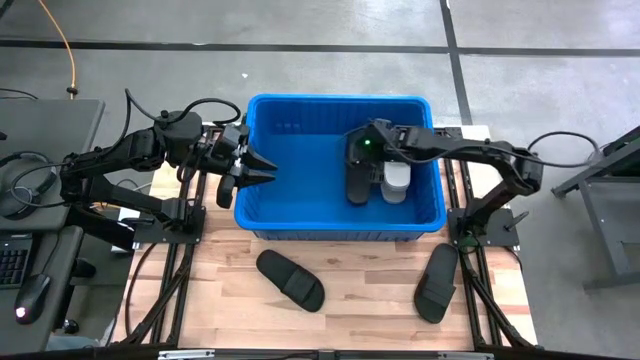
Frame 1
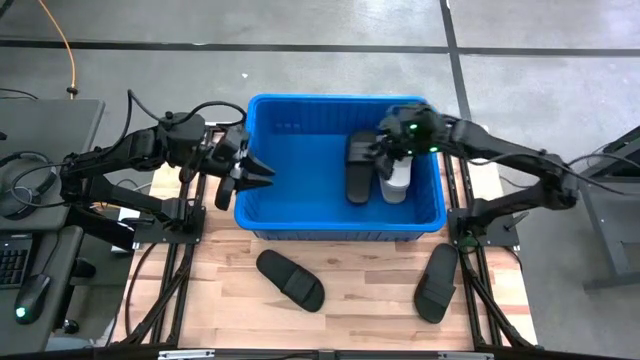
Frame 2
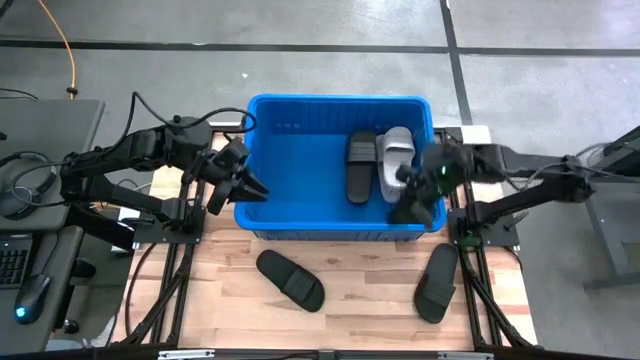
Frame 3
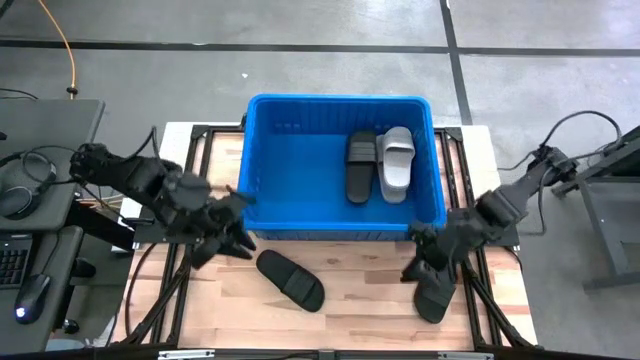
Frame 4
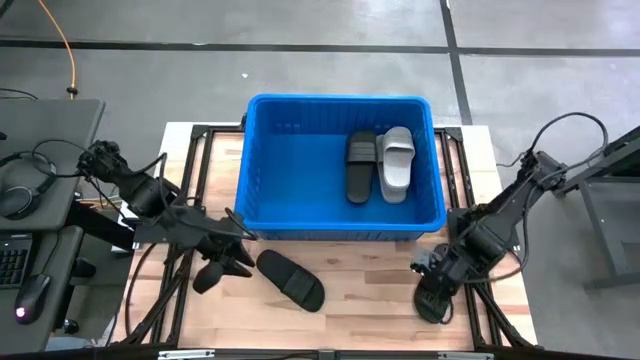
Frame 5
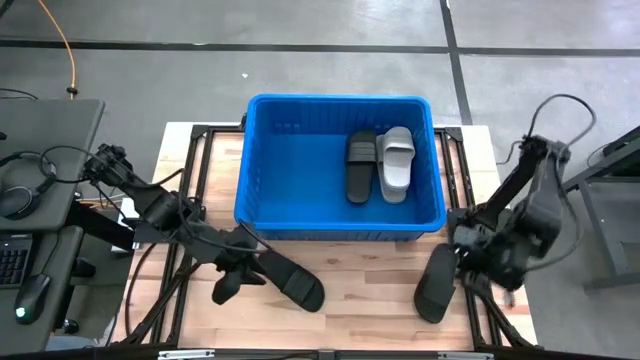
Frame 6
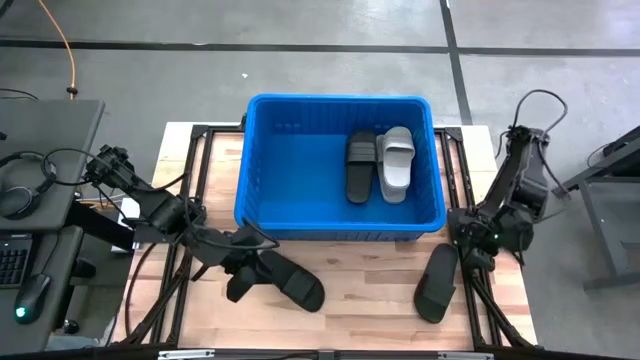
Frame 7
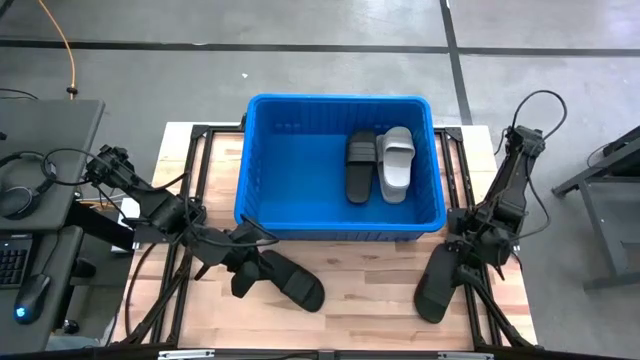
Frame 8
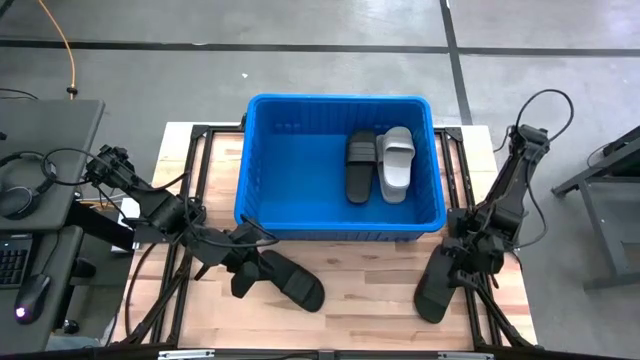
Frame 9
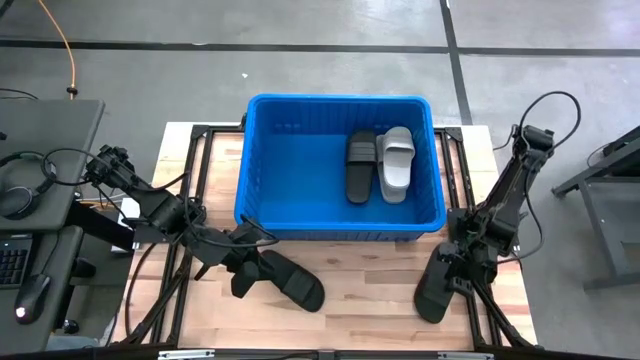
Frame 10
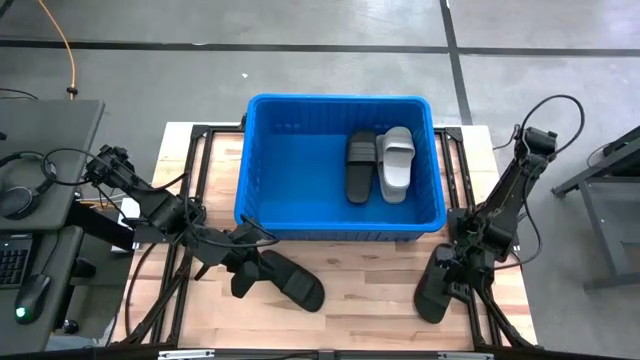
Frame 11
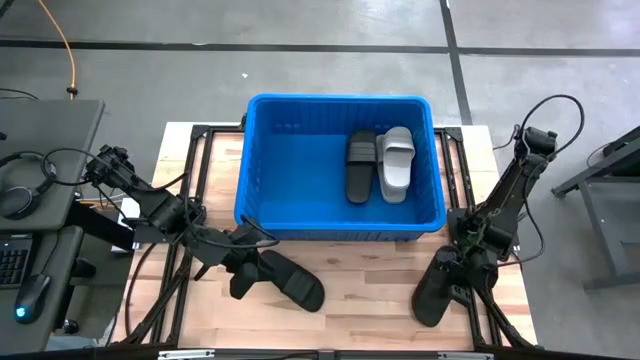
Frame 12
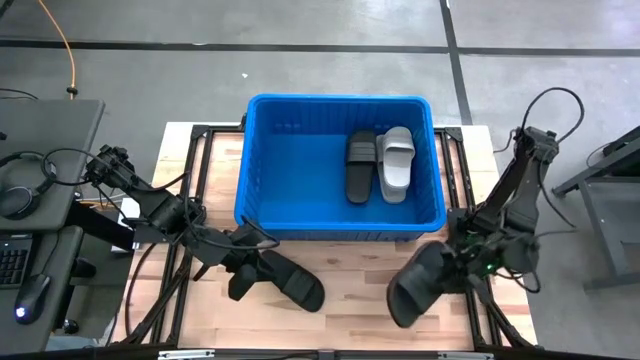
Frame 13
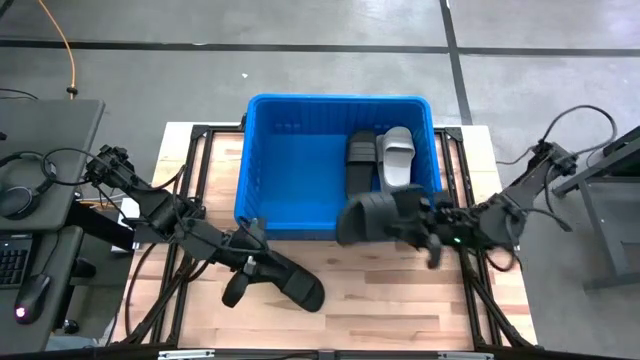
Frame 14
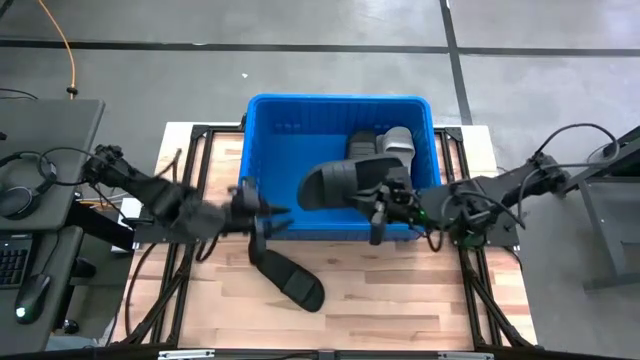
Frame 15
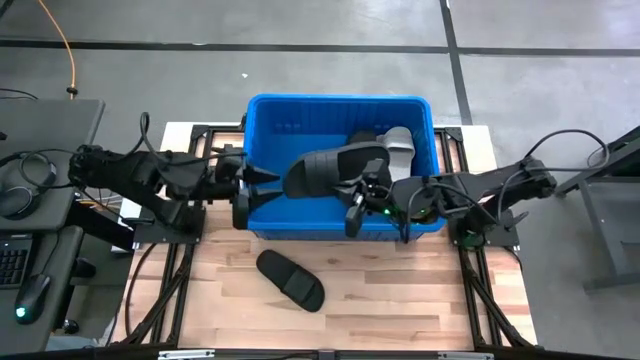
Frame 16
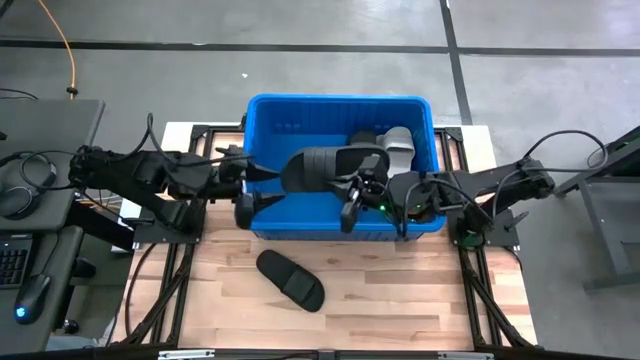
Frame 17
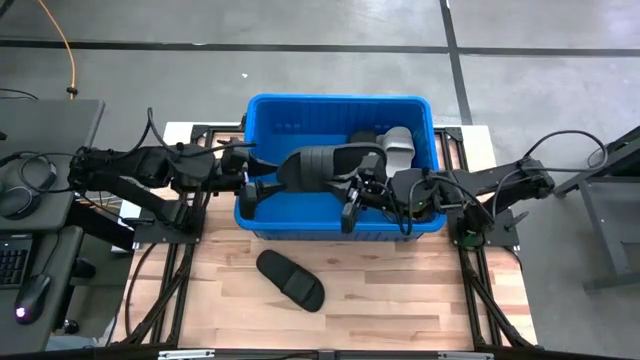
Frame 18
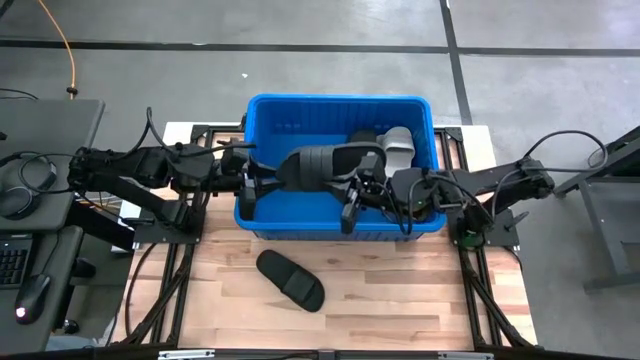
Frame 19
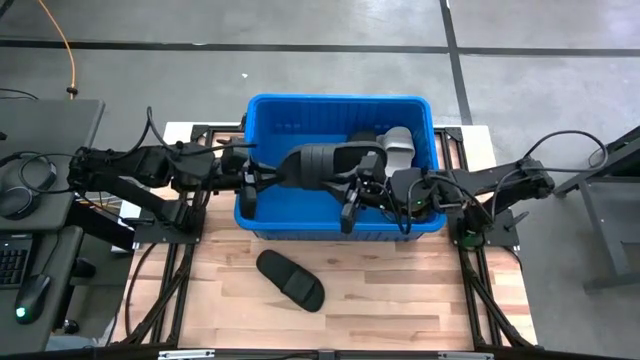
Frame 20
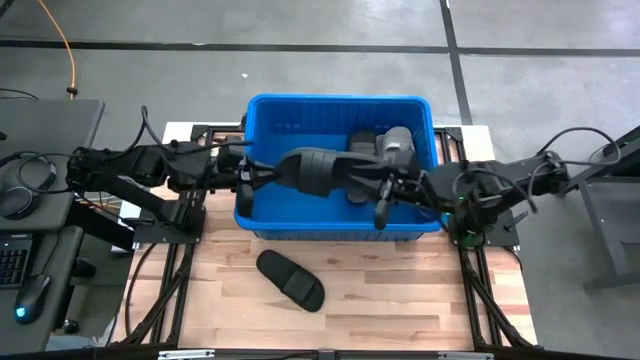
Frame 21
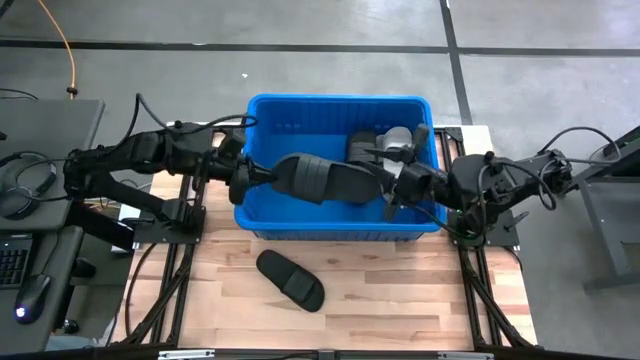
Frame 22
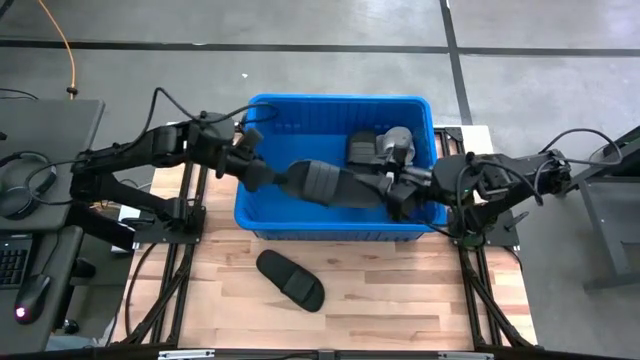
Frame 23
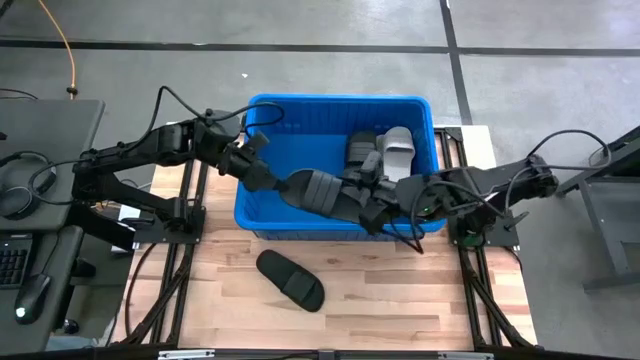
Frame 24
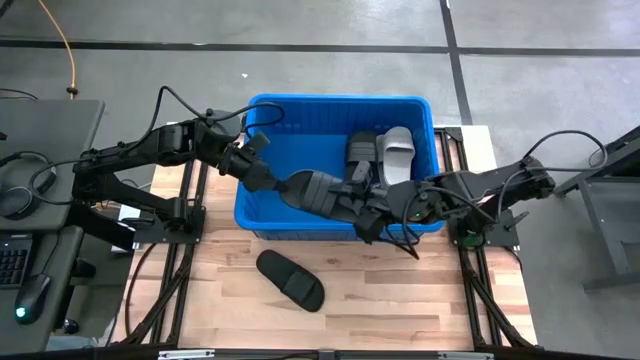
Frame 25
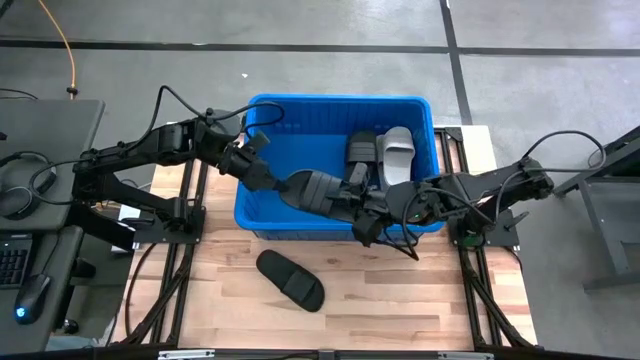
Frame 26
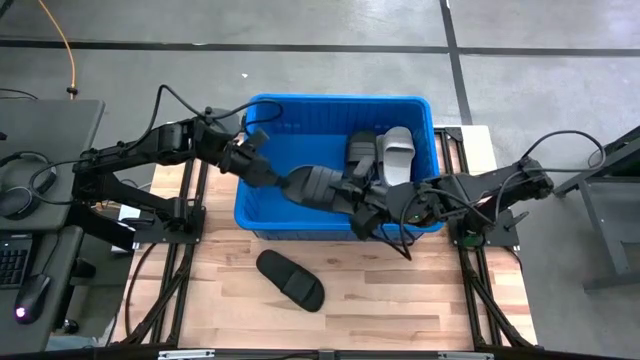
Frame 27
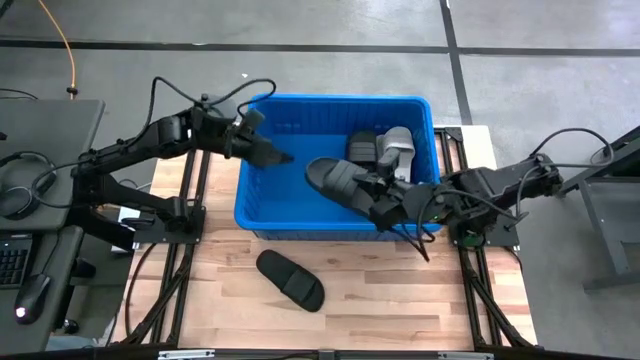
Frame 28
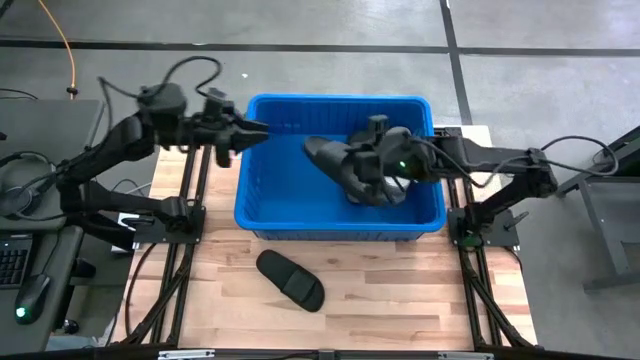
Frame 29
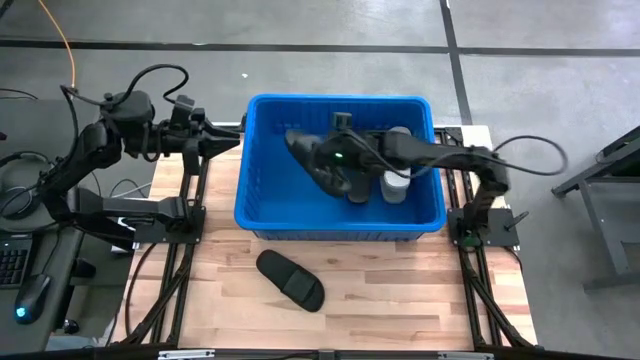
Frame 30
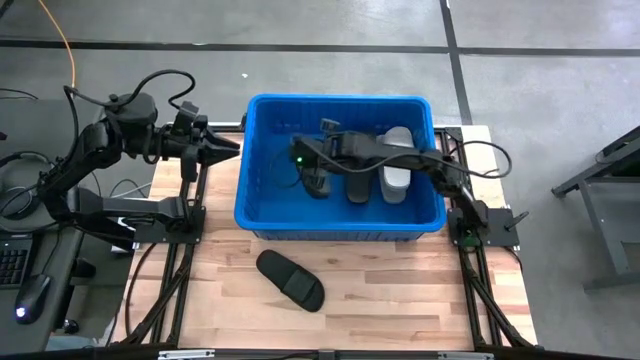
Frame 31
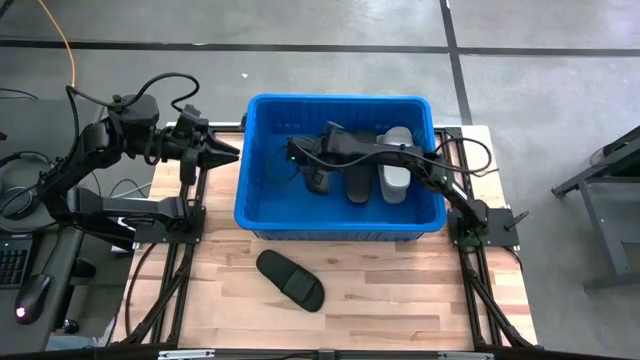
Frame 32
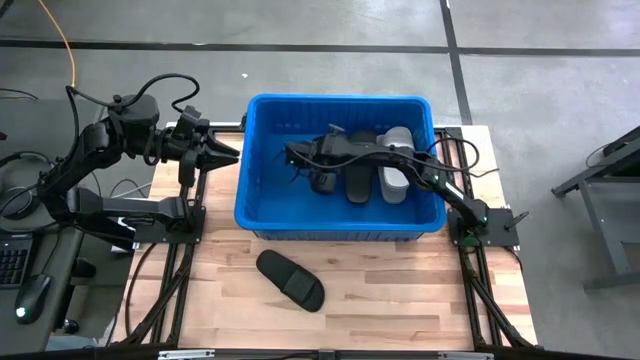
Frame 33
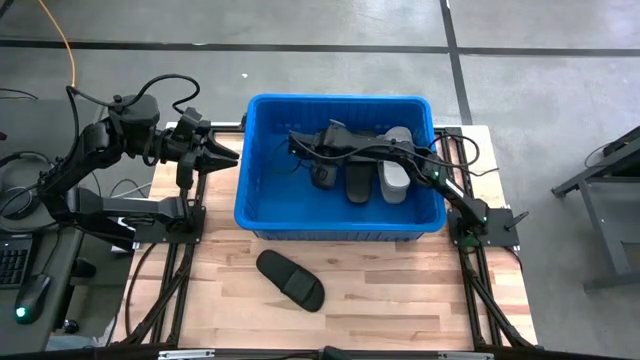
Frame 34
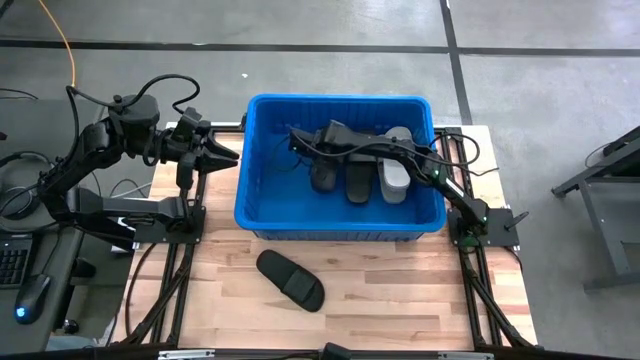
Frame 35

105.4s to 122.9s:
Task: Pick and place slides into bin
Put the left black slide into the blue bin

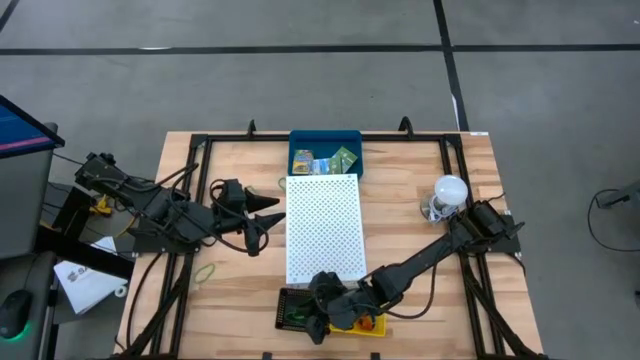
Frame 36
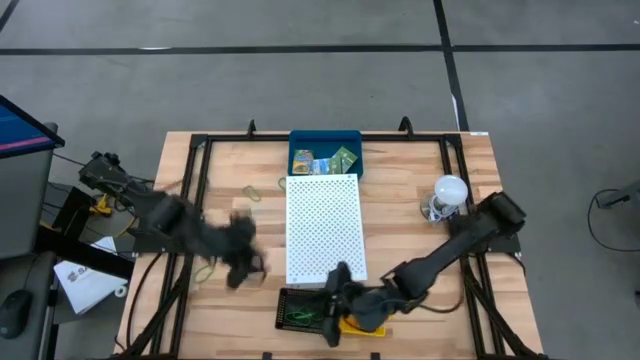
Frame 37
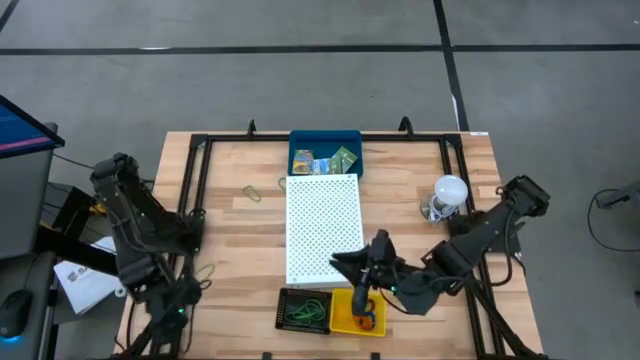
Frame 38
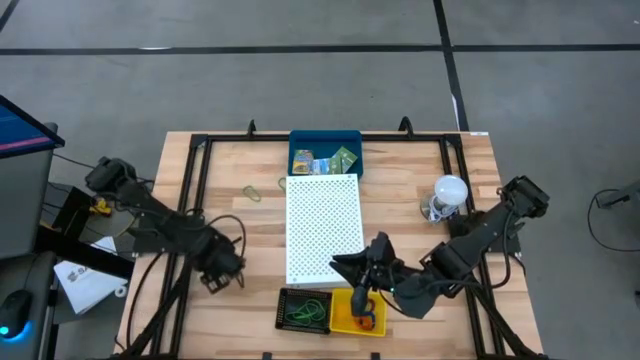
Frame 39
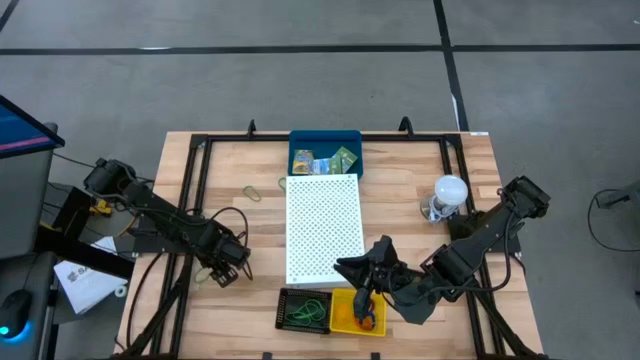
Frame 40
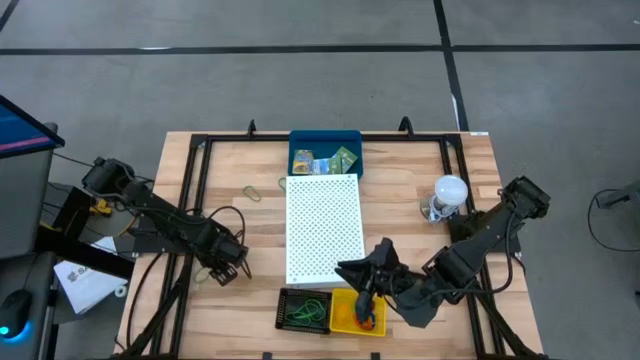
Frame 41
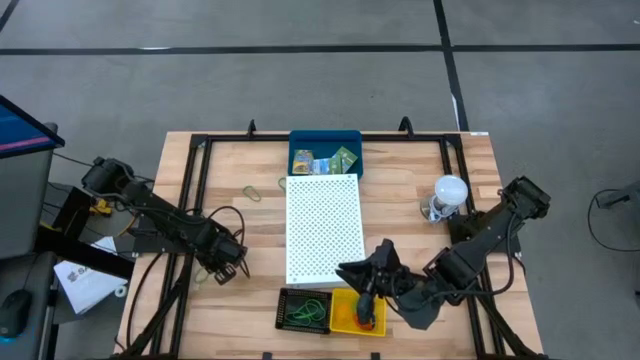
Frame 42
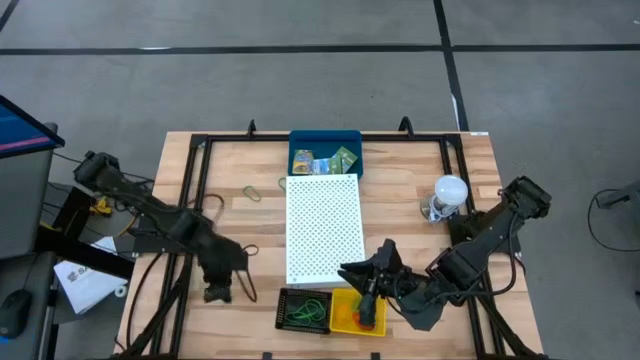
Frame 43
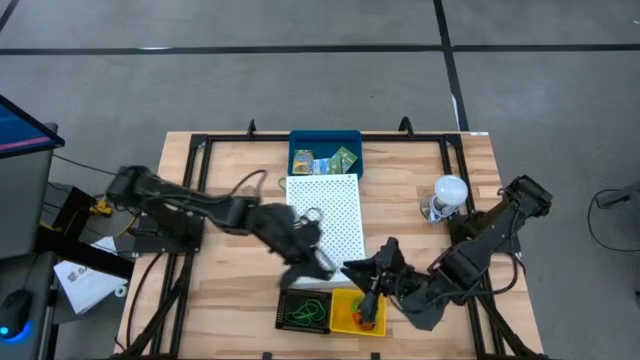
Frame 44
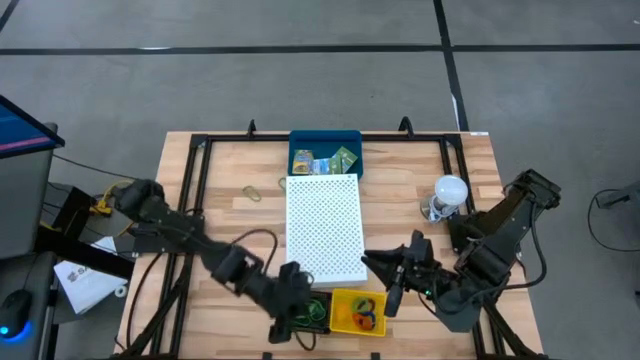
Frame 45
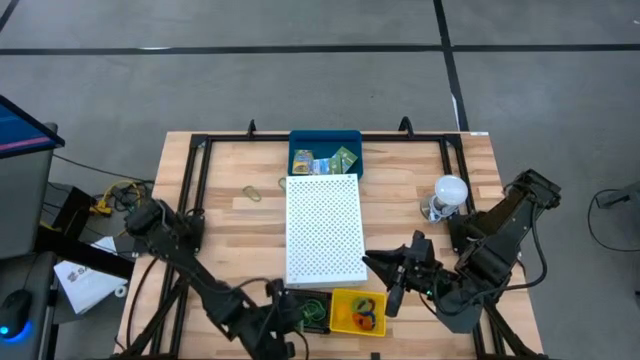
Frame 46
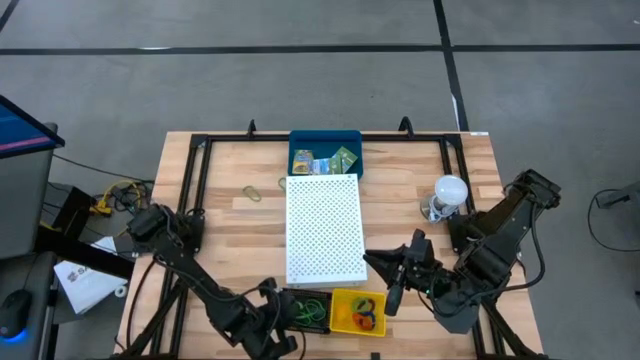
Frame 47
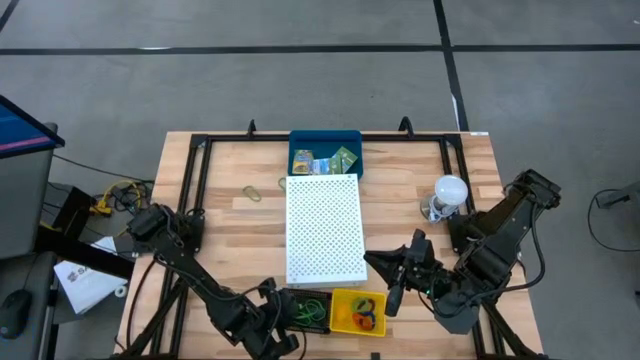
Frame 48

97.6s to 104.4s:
Task: Pick & Place Office Desk Supplies
Put the green rubber band into the black bin
